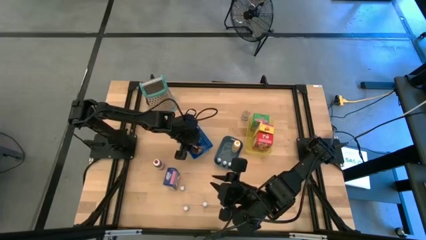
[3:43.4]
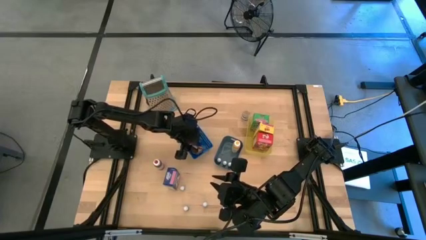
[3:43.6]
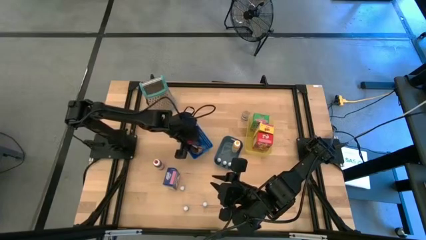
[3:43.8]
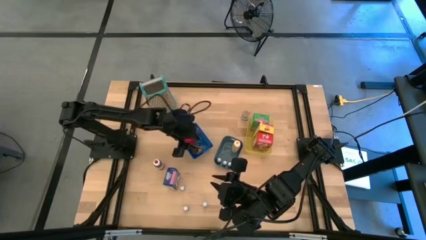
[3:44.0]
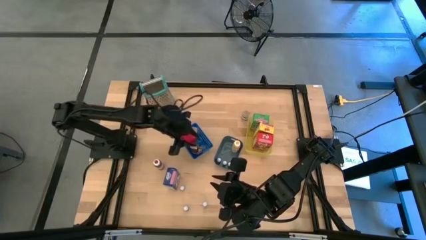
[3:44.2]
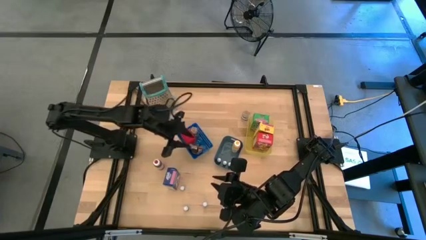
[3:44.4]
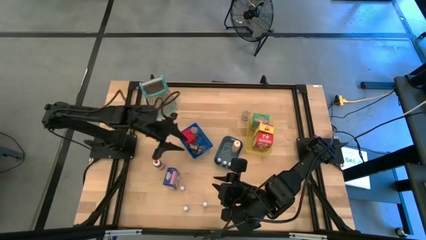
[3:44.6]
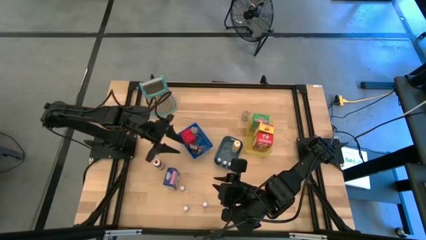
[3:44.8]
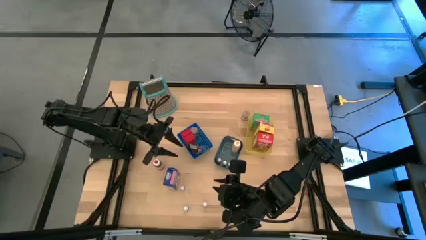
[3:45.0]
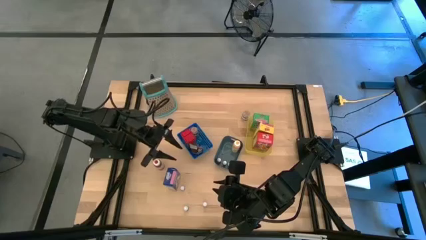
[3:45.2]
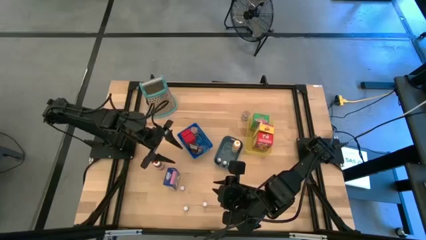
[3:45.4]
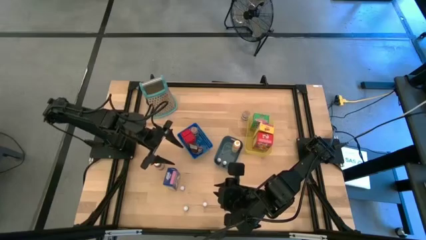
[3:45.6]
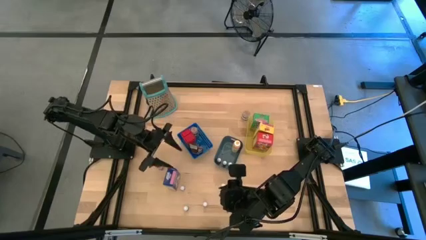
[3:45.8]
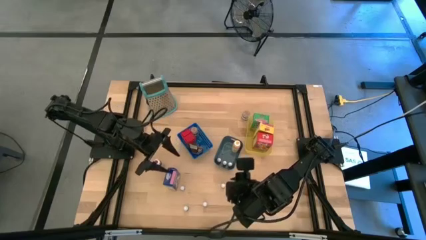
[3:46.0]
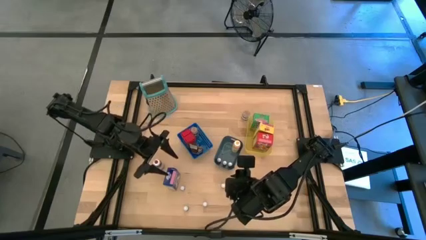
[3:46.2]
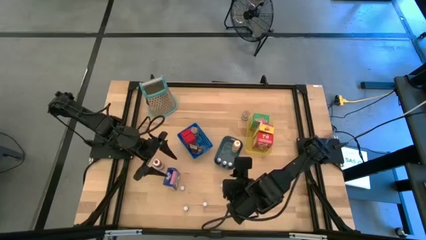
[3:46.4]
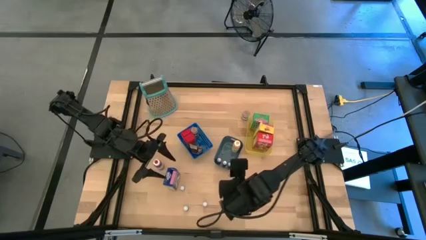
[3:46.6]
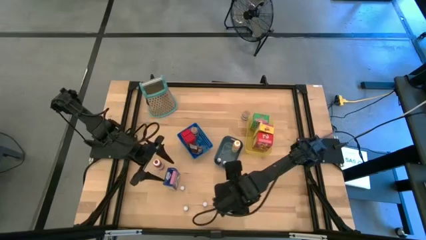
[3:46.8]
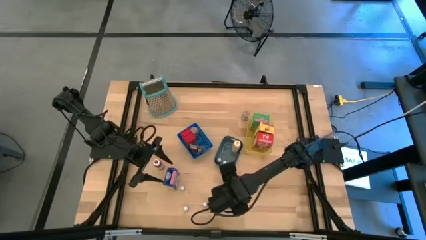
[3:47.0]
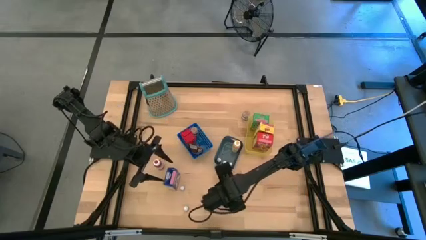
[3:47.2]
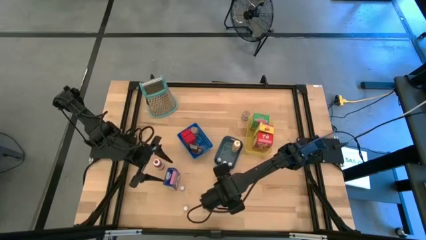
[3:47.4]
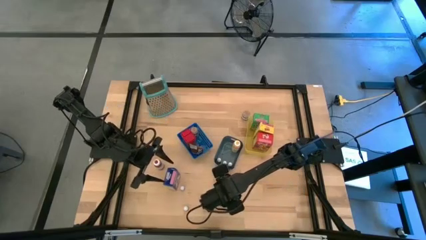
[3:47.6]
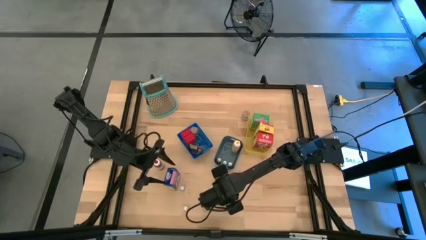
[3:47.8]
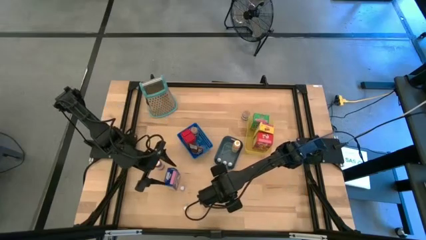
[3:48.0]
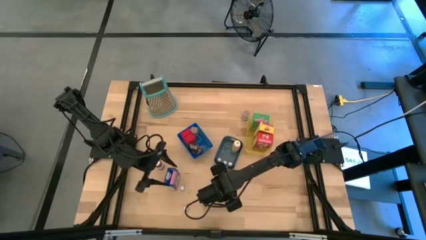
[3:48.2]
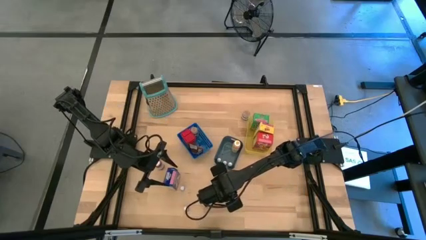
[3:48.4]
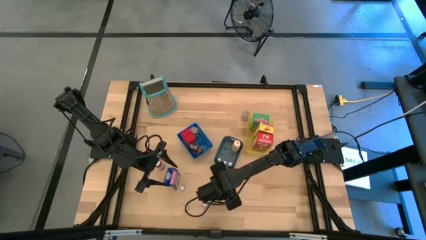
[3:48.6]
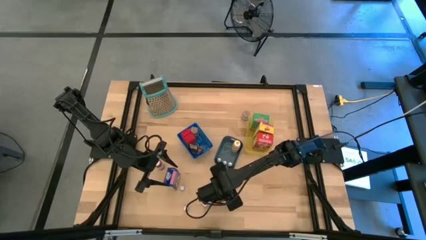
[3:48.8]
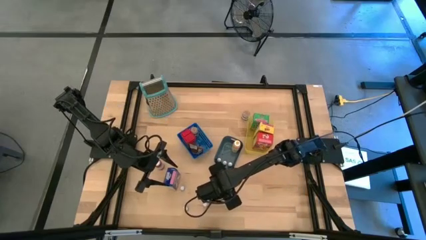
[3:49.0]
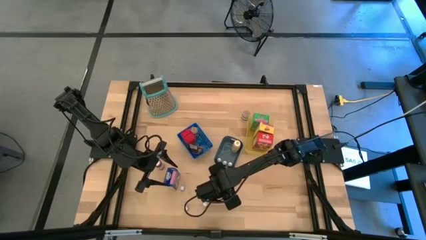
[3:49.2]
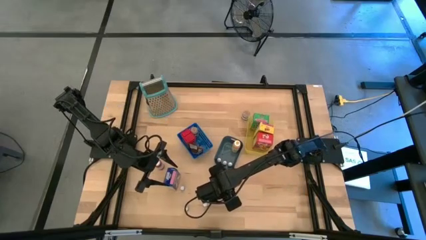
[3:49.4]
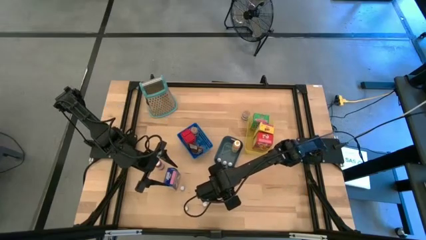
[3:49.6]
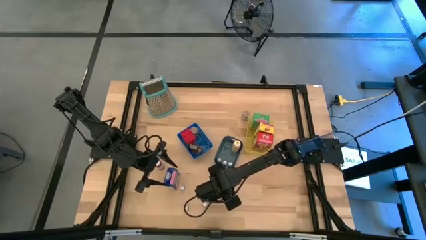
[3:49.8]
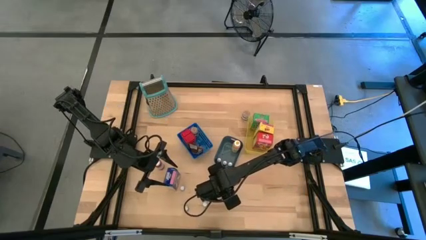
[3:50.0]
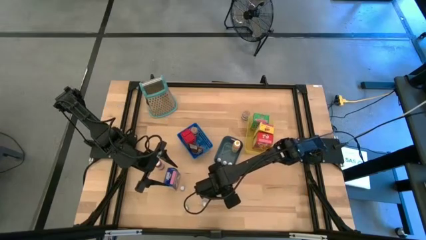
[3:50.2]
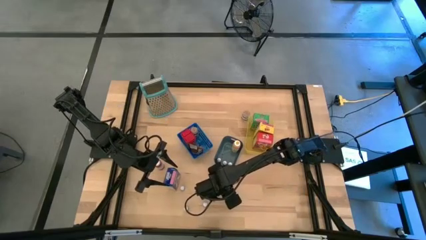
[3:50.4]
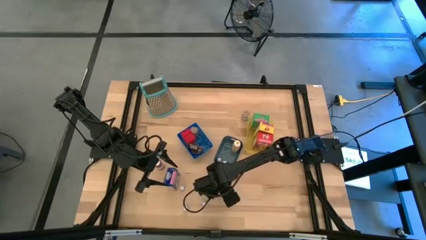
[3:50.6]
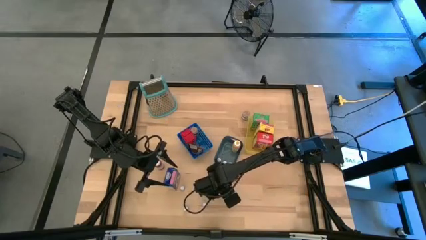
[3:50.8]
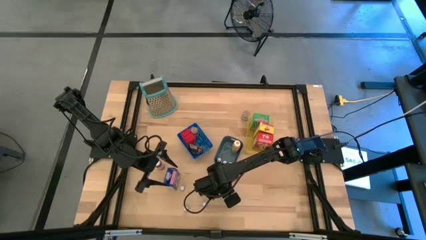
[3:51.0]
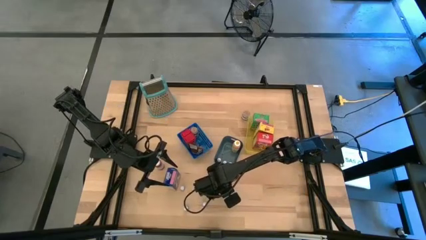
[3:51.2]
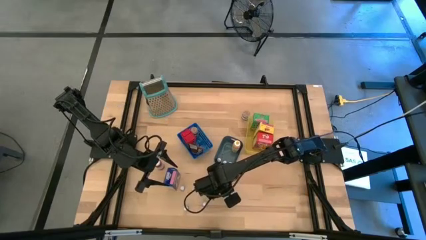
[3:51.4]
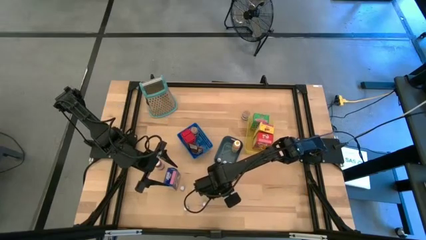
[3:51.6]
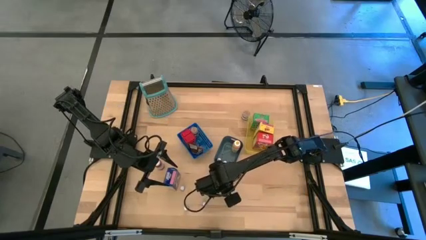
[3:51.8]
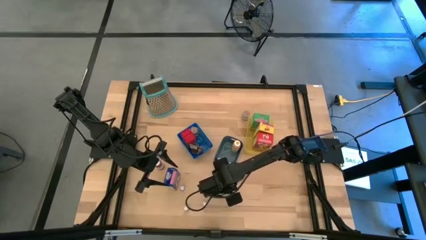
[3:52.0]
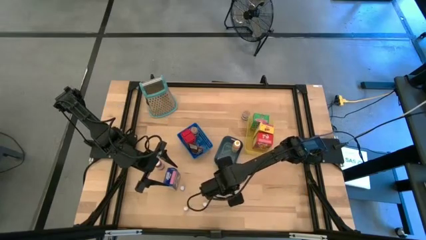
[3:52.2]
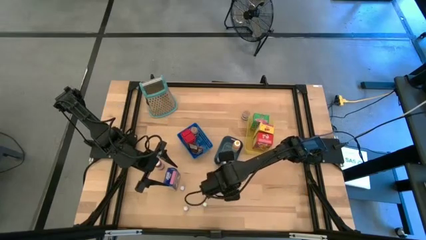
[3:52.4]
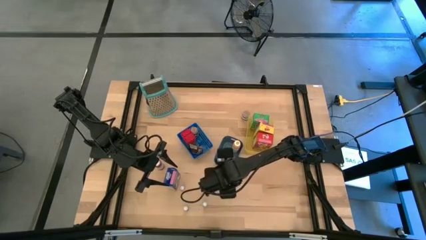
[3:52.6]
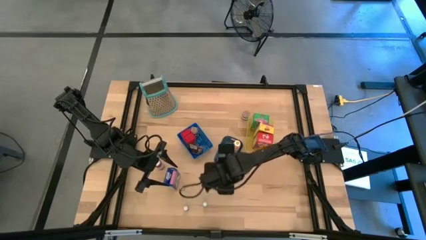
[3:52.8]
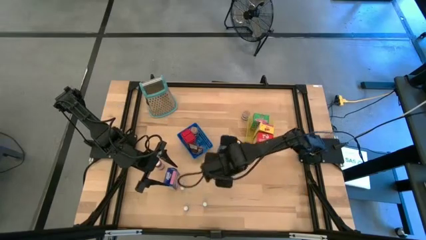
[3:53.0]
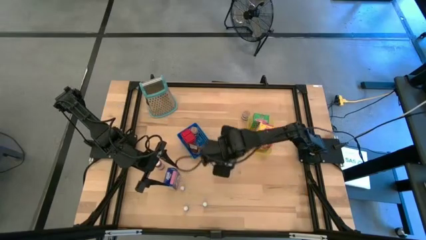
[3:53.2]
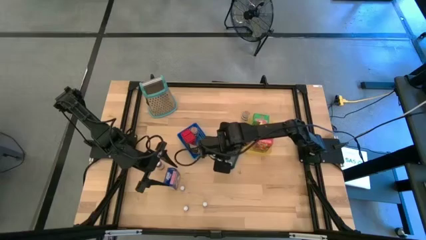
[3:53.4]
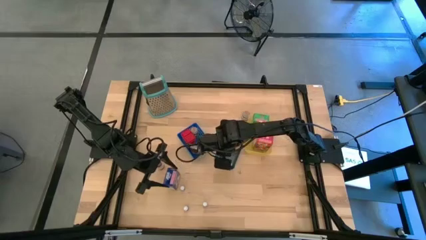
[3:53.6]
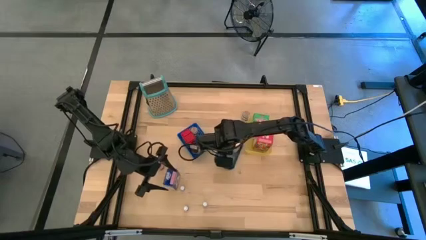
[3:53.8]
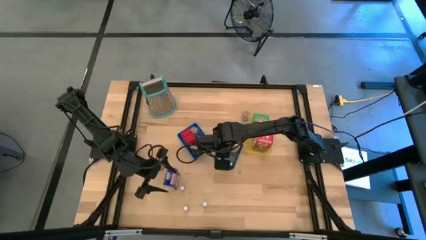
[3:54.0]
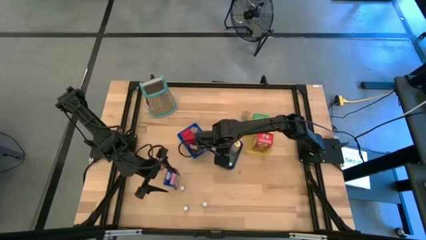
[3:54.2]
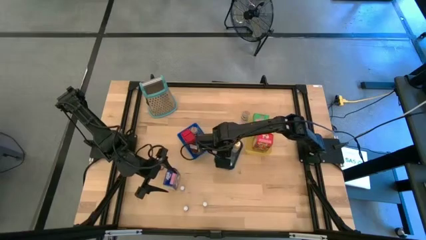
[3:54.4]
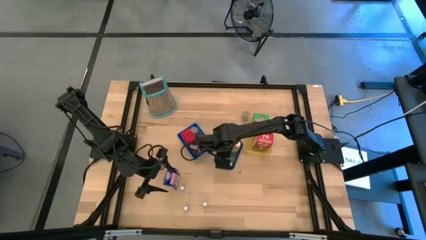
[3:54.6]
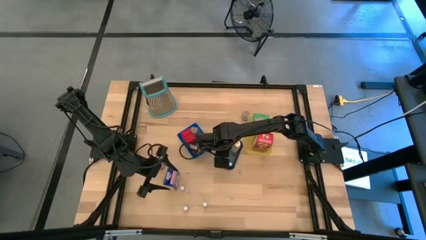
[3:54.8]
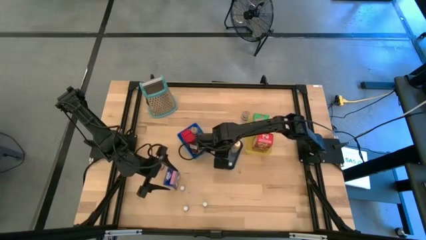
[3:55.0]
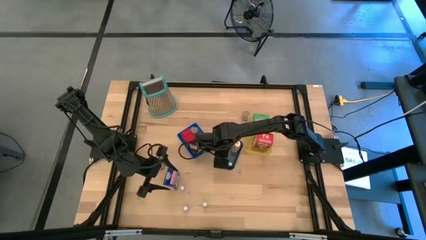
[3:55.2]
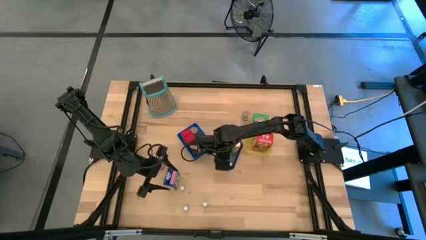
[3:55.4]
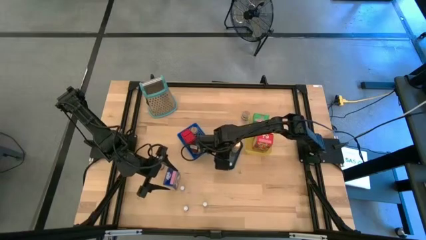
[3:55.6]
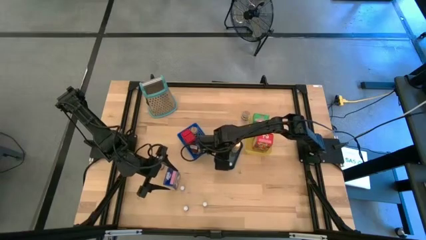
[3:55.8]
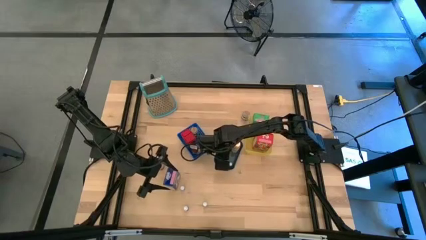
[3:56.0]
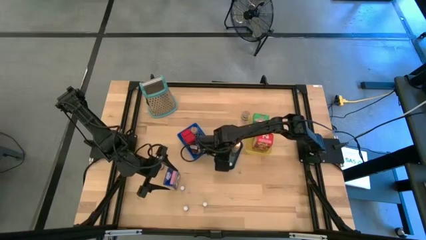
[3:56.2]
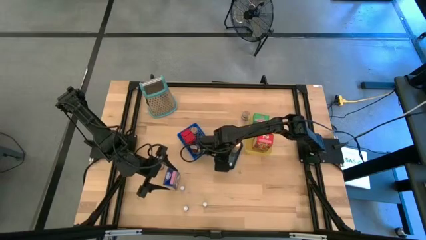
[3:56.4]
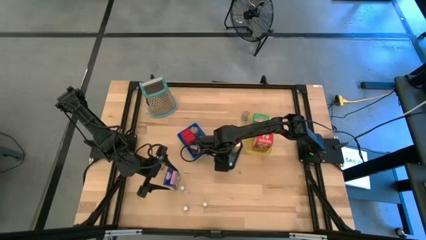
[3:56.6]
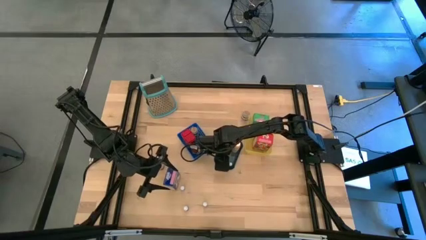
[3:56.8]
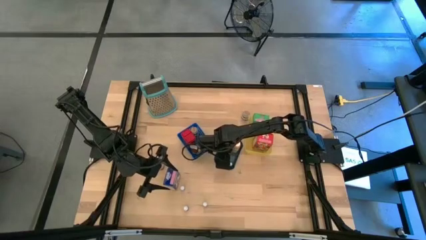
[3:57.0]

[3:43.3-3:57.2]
Task: Pick & Place Kitchen Items
Put the blue food coloring bottle into the green bin
